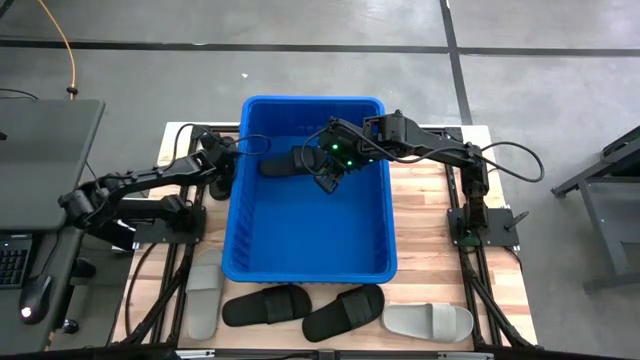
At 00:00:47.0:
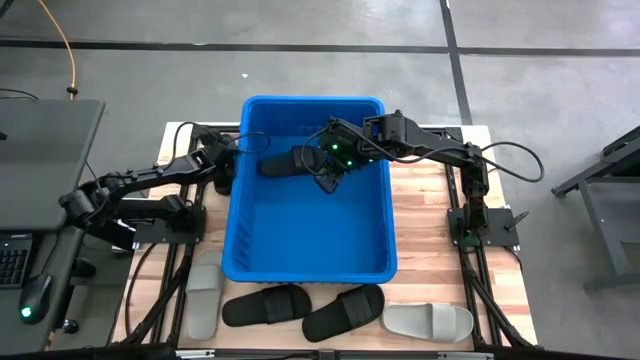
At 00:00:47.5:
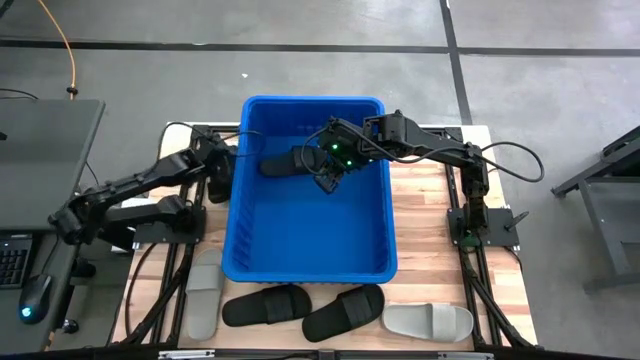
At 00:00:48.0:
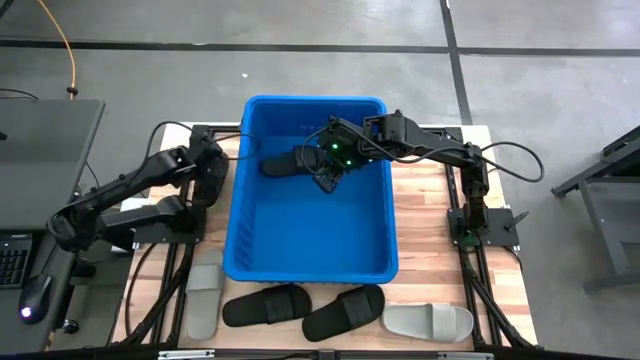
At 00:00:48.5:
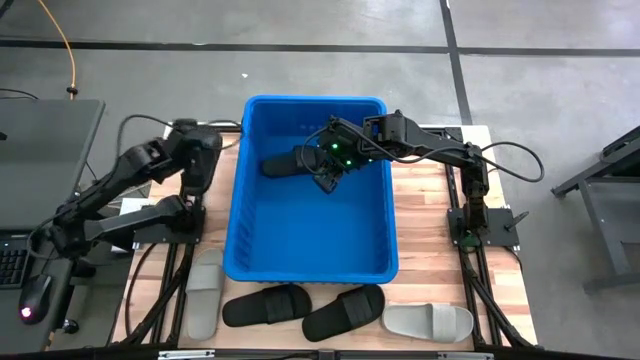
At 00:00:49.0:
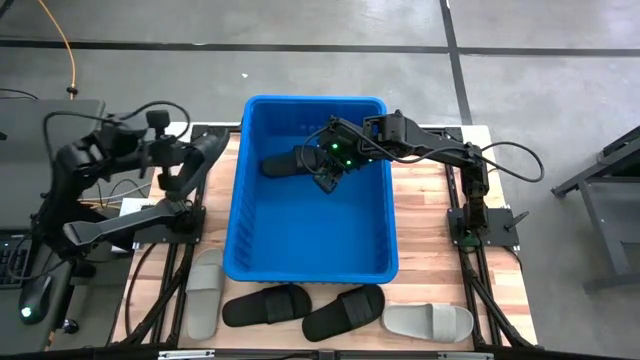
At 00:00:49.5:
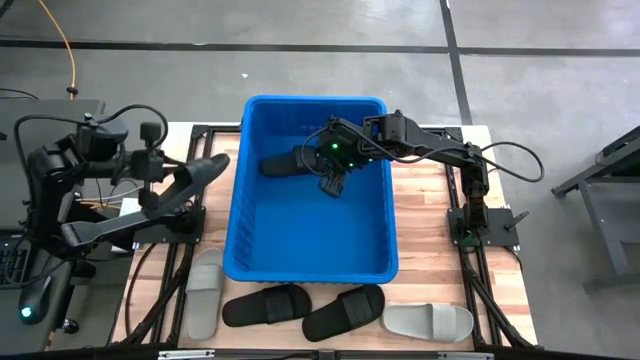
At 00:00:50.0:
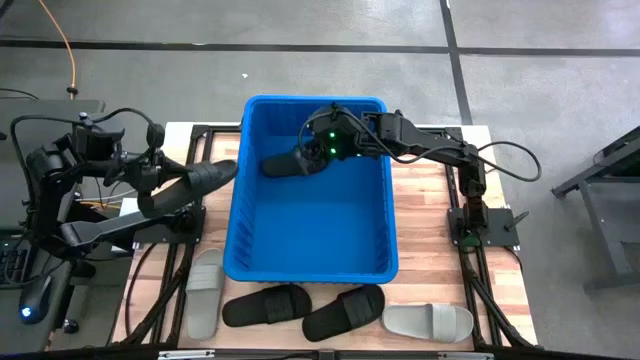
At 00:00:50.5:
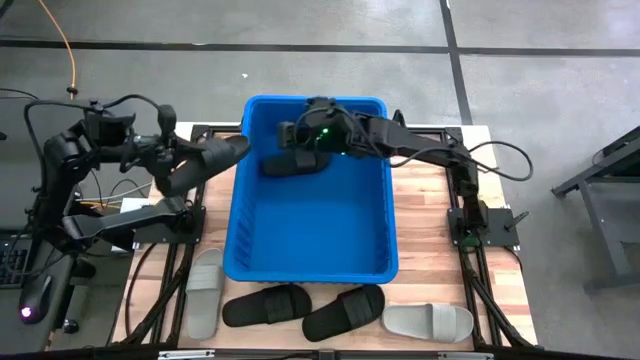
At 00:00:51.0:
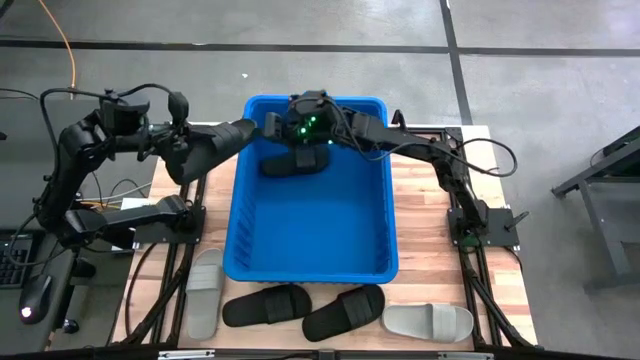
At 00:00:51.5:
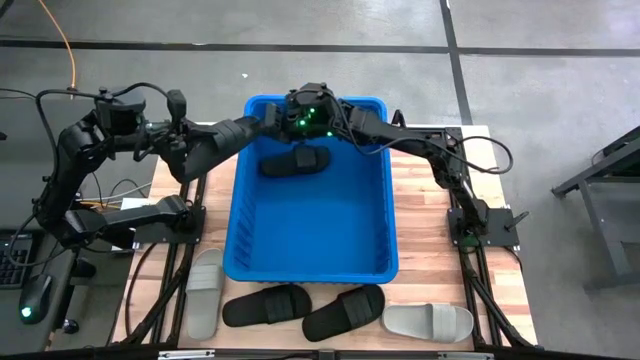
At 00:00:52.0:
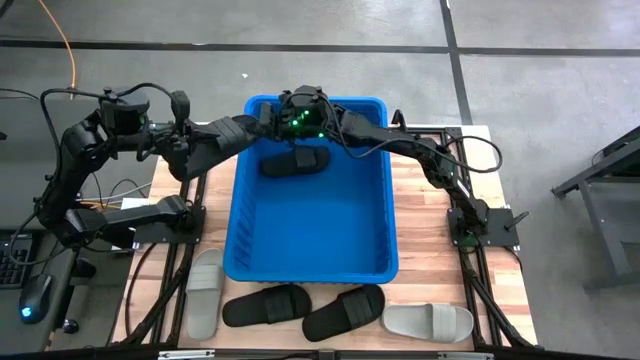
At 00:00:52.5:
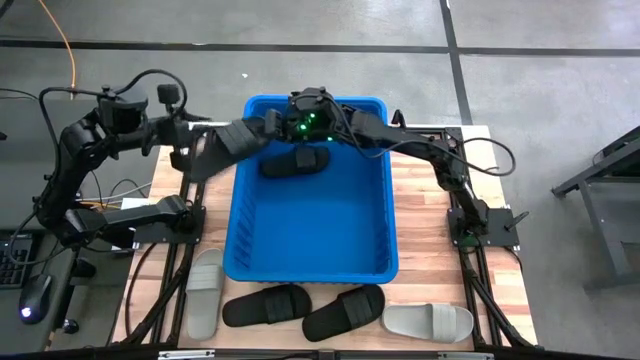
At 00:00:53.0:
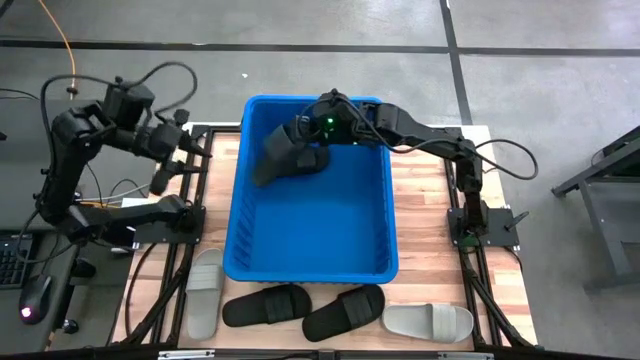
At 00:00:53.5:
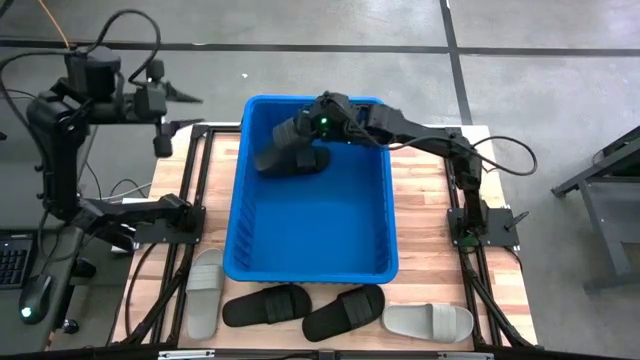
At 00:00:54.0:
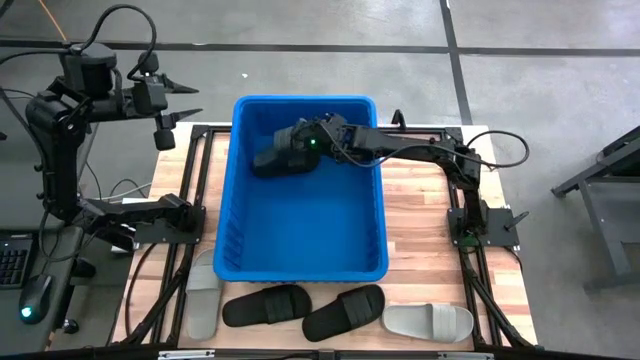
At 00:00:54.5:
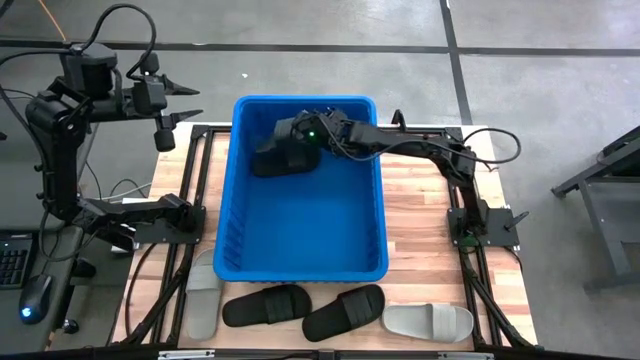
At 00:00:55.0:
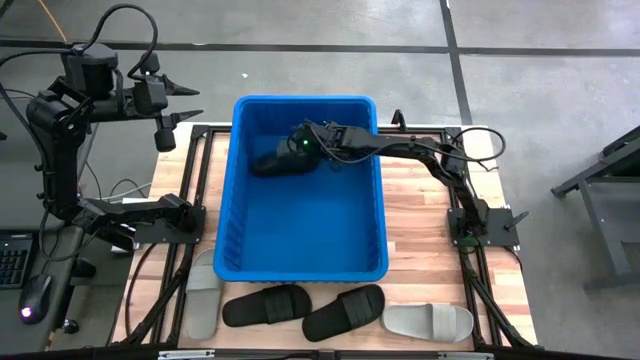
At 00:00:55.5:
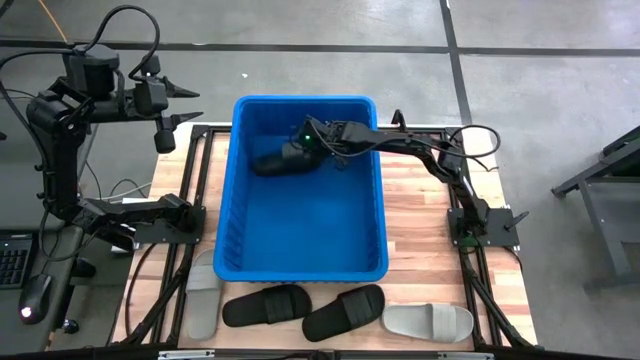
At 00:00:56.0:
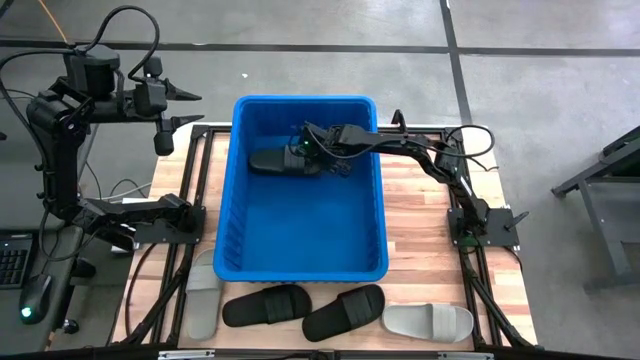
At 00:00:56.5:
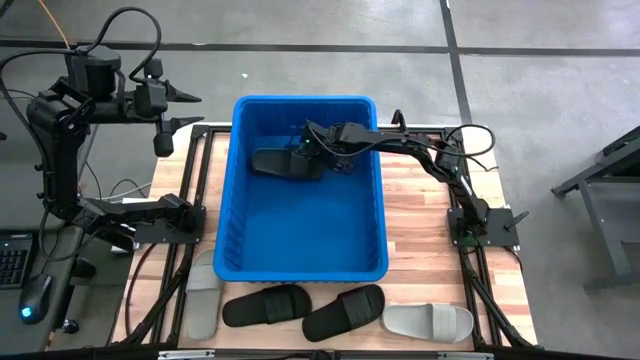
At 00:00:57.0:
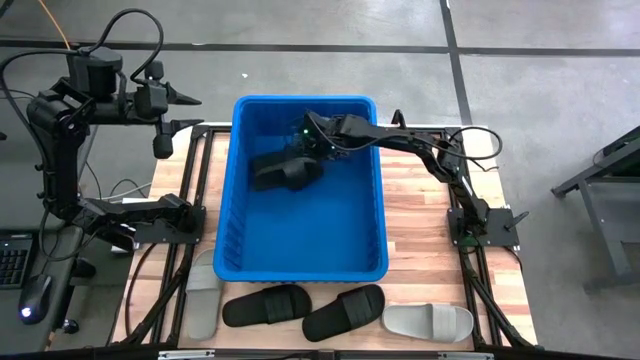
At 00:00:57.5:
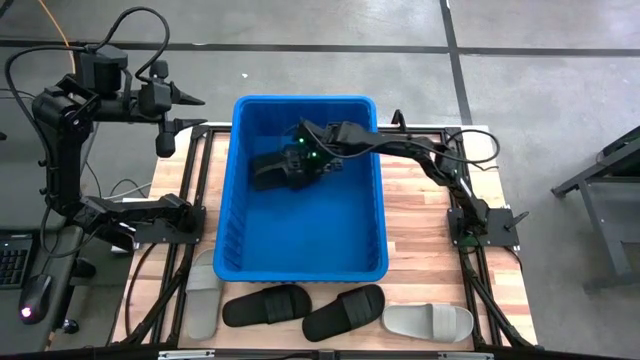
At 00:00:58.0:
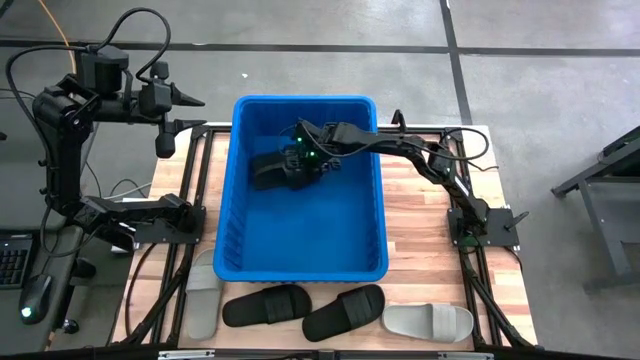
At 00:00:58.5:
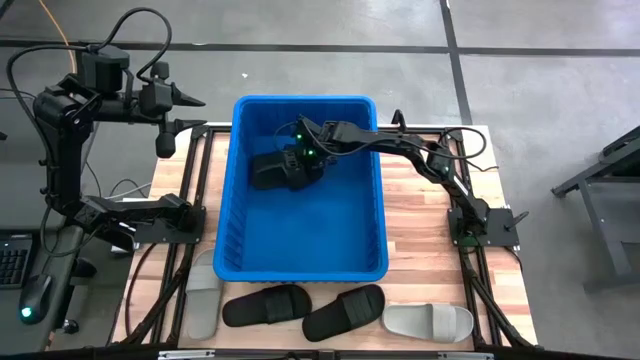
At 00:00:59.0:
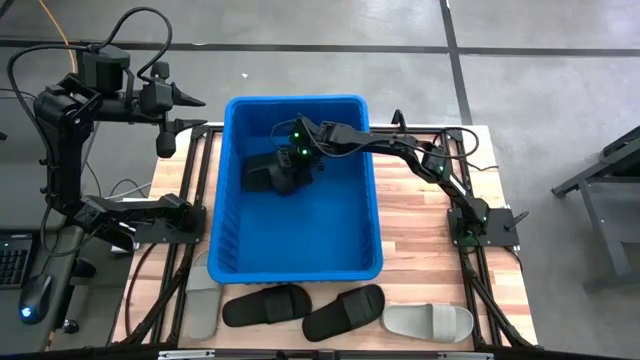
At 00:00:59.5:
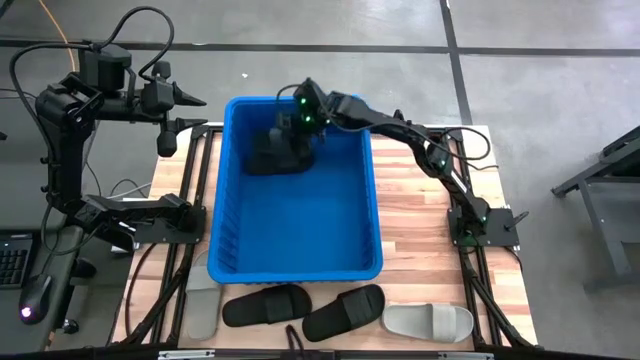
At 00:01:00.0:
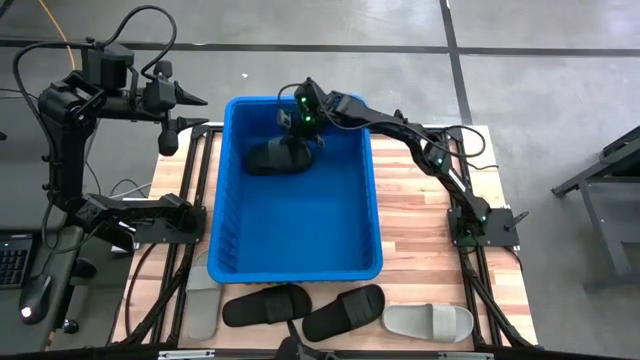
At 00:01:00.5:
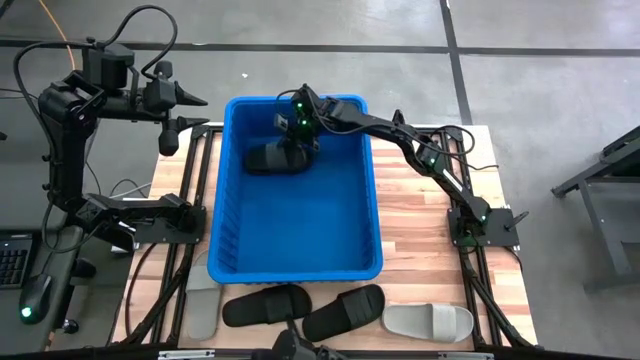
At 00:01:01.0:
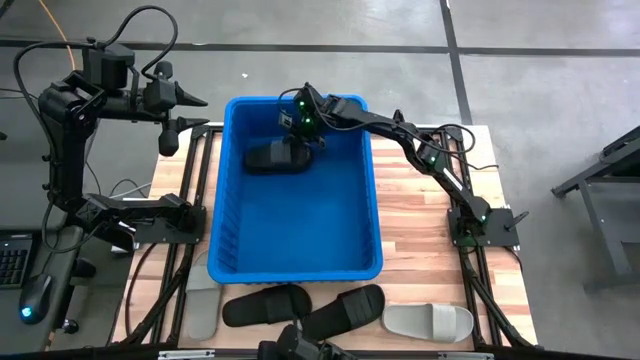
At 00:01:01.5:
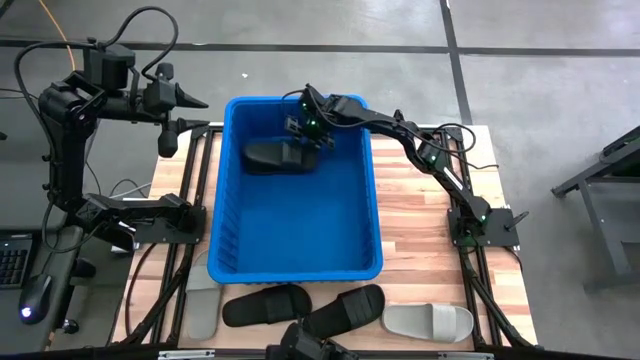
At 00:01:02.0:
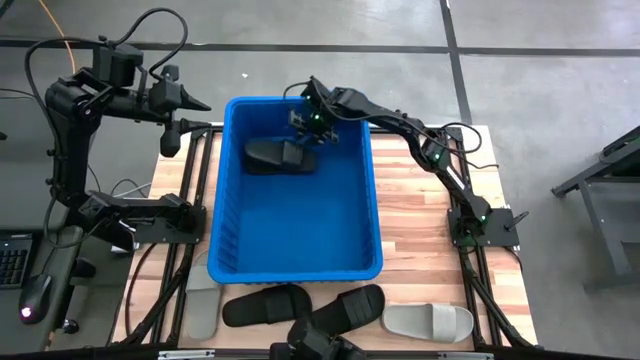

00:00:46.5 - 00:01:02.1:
Task: Pick and place slides into bin
Put the top black slide into the blue container

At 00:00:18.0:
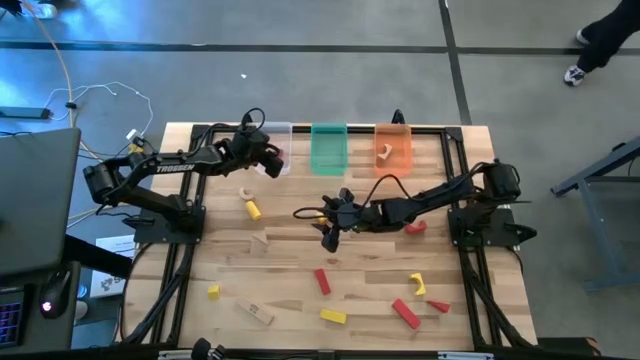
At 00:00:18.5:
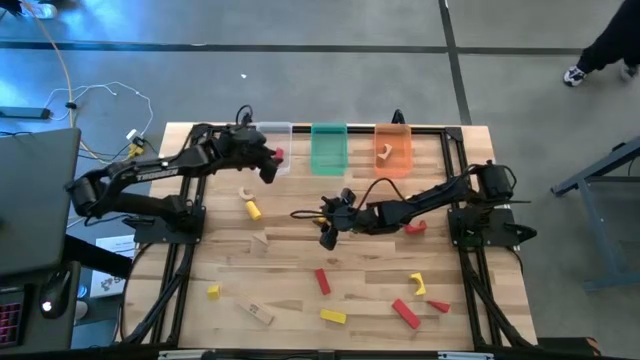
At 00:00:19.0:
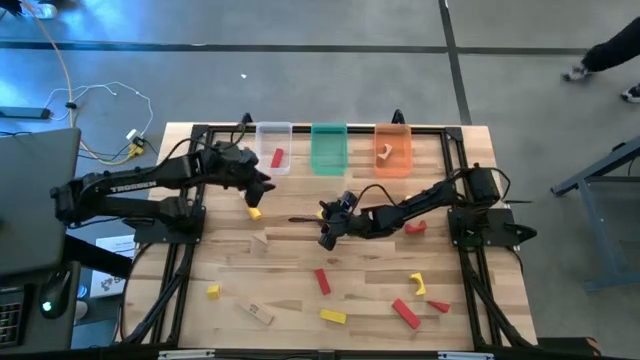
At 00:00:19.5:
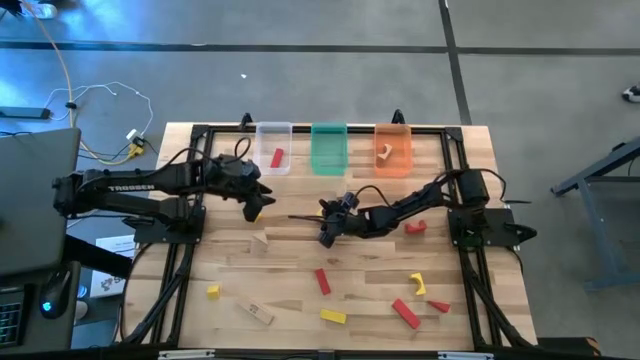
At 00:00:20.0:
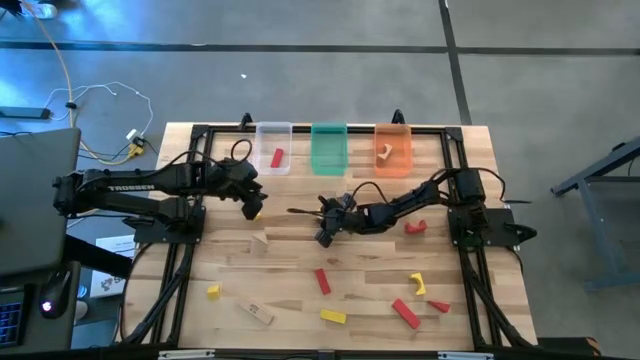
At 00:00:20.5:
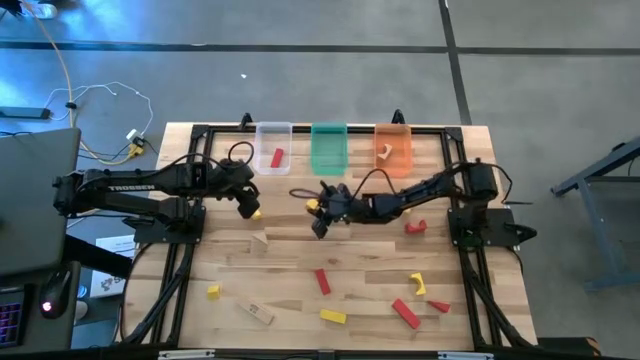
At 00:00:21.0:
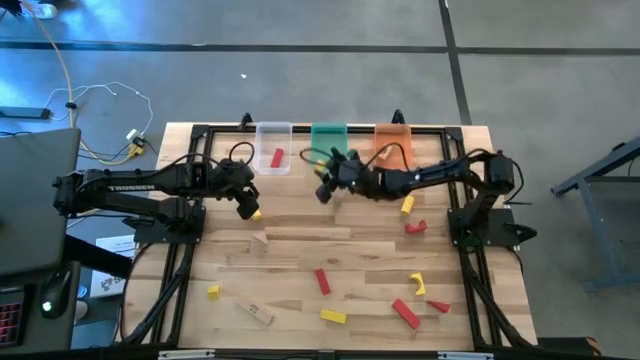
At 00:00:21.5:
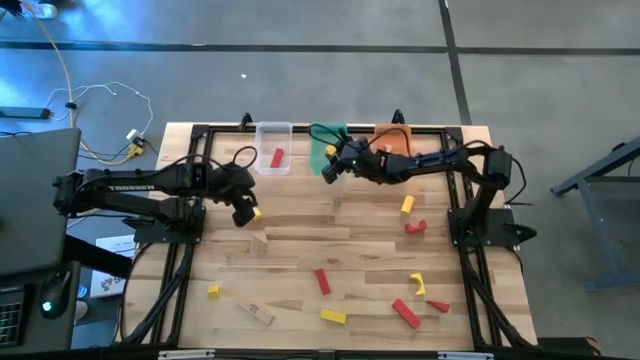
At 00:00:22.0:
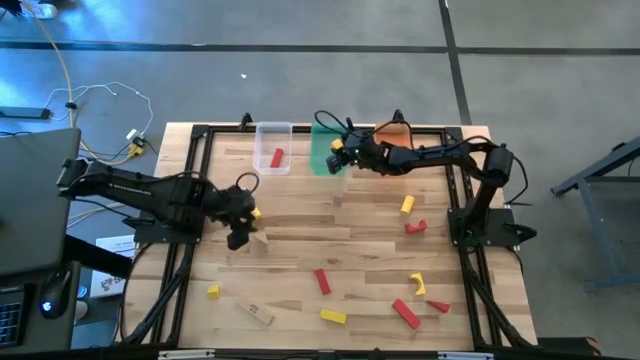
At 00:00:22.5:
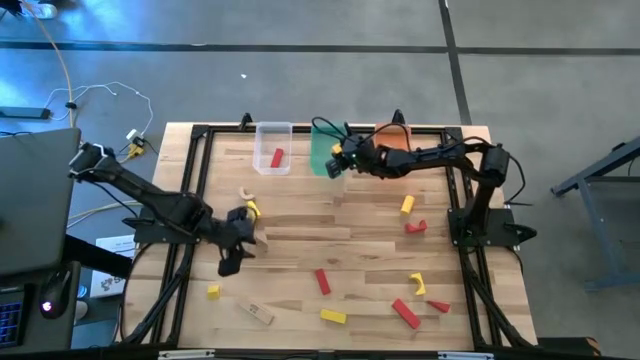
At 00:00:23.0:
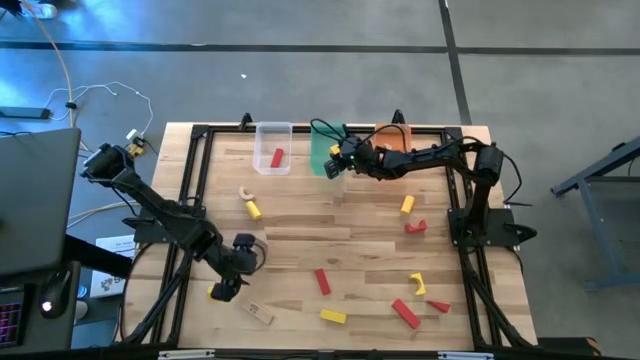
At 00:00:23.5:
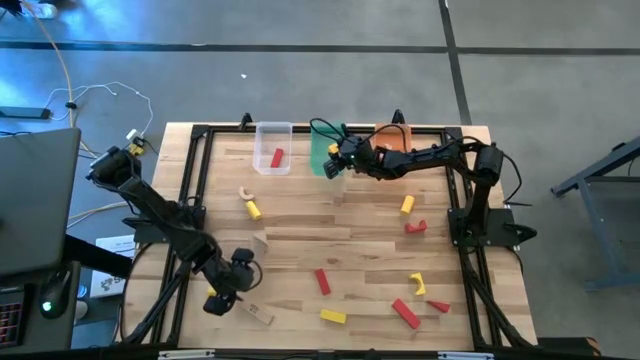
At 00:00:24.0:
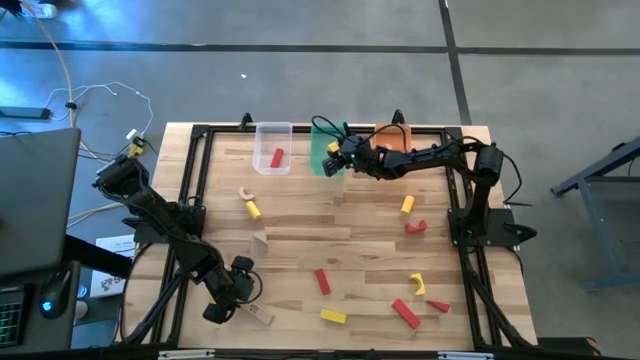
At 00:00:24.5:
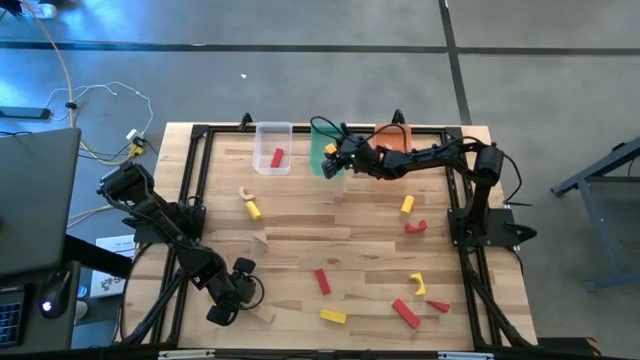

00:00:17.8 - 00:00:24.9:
Task: Sort & place blocks by color
Put the yellow block into the green bin
